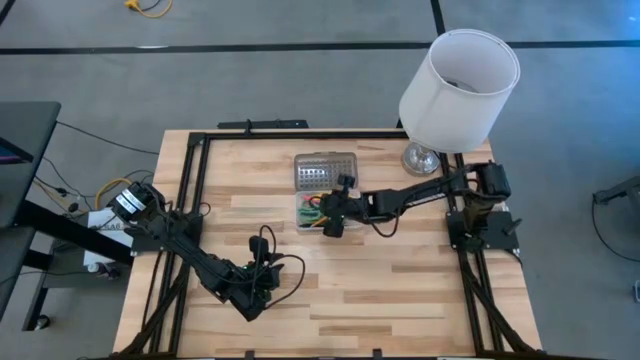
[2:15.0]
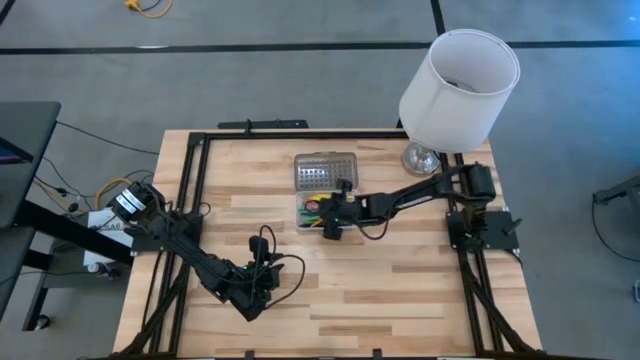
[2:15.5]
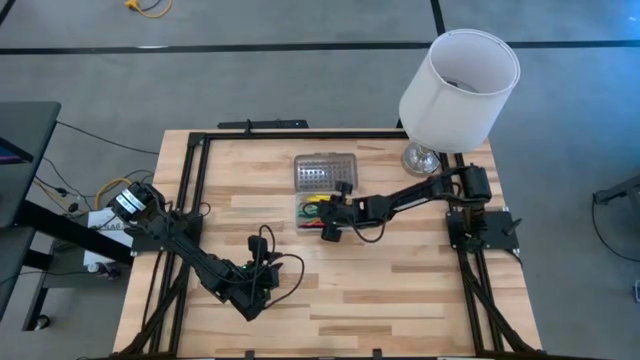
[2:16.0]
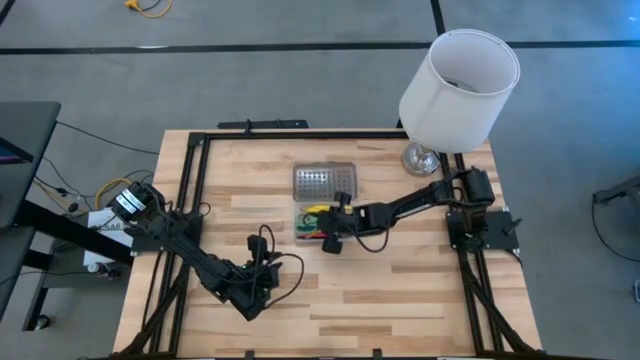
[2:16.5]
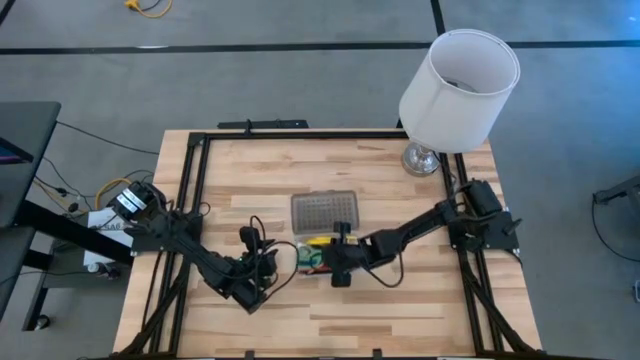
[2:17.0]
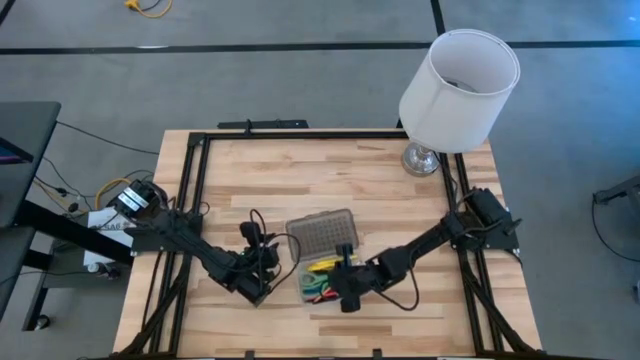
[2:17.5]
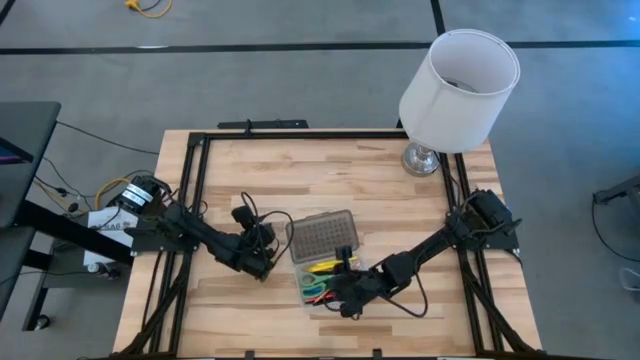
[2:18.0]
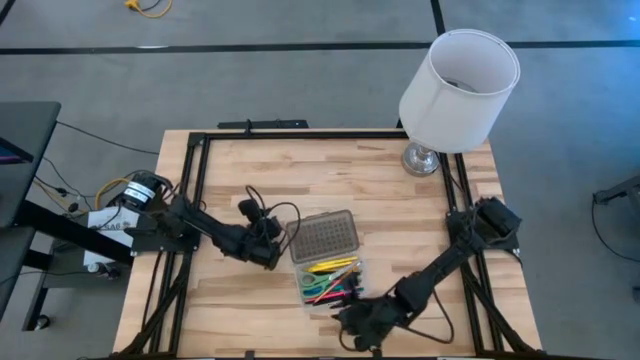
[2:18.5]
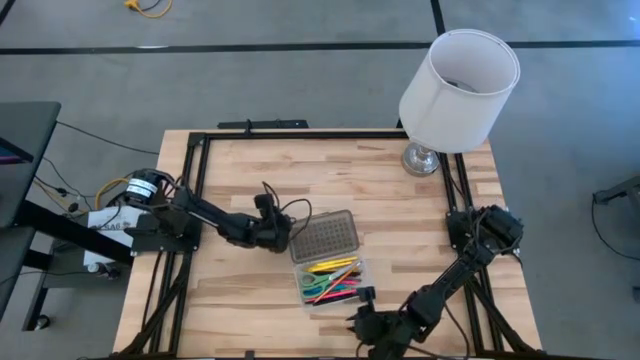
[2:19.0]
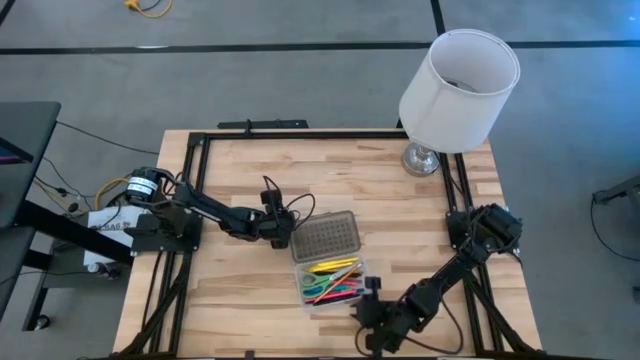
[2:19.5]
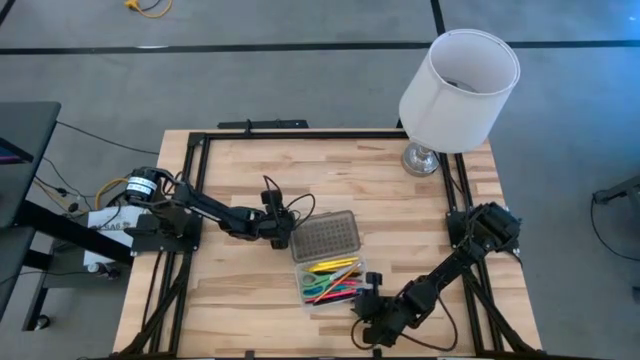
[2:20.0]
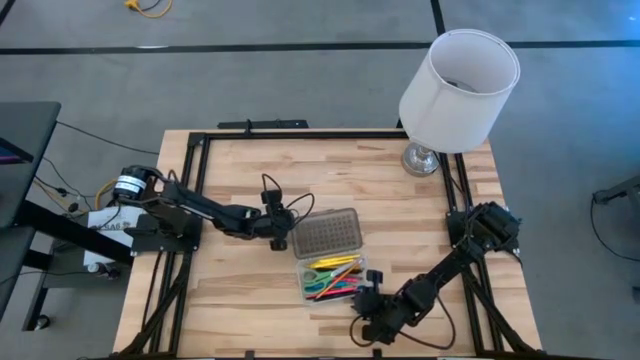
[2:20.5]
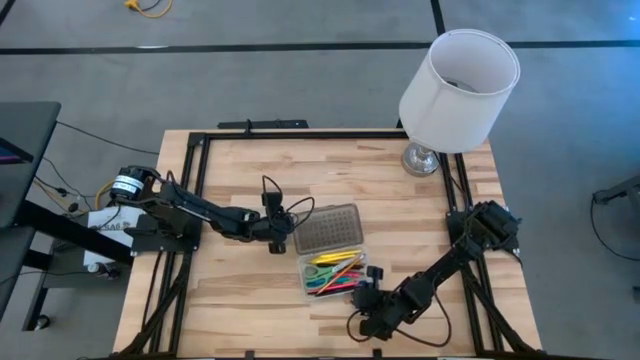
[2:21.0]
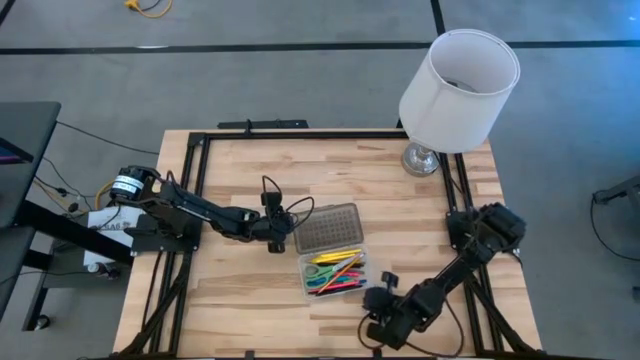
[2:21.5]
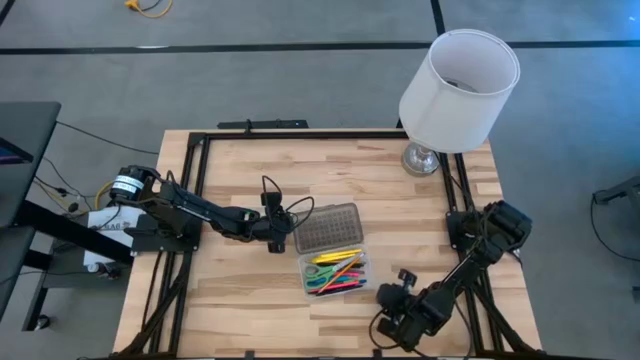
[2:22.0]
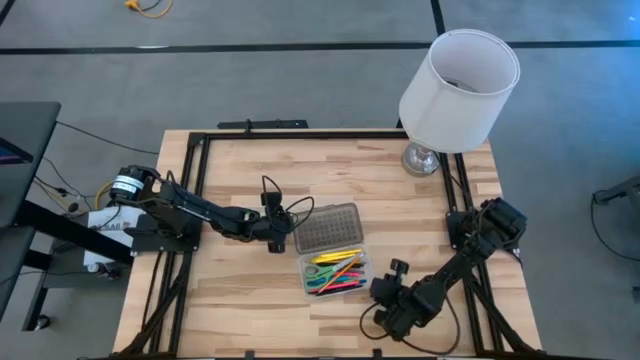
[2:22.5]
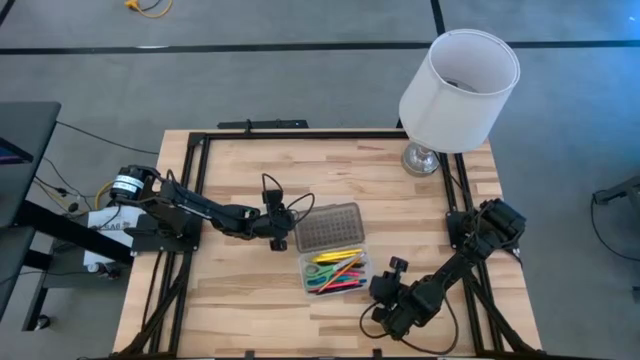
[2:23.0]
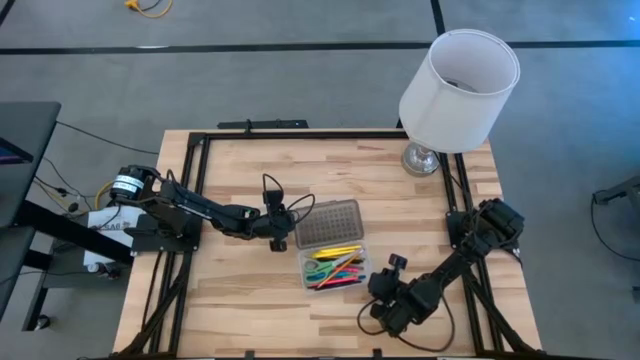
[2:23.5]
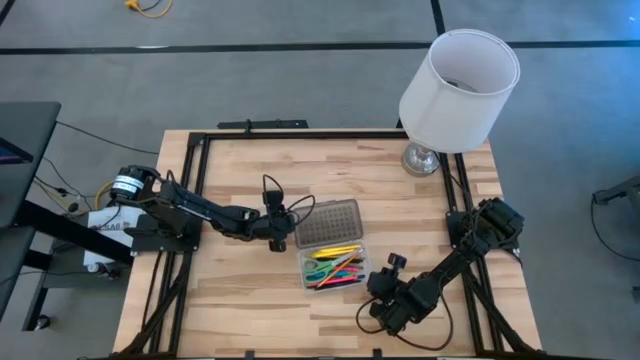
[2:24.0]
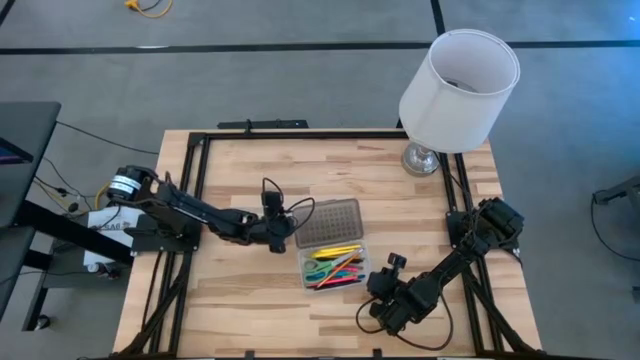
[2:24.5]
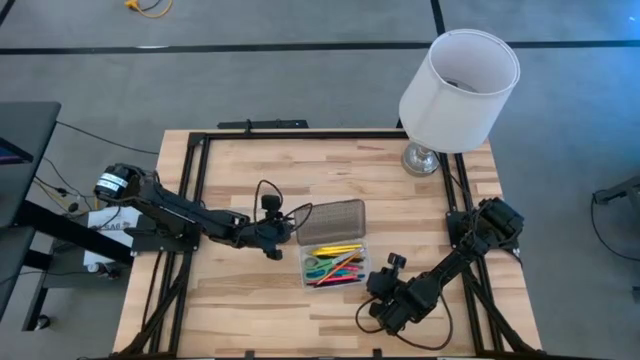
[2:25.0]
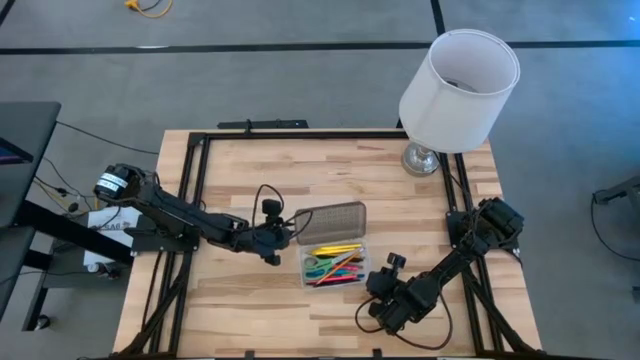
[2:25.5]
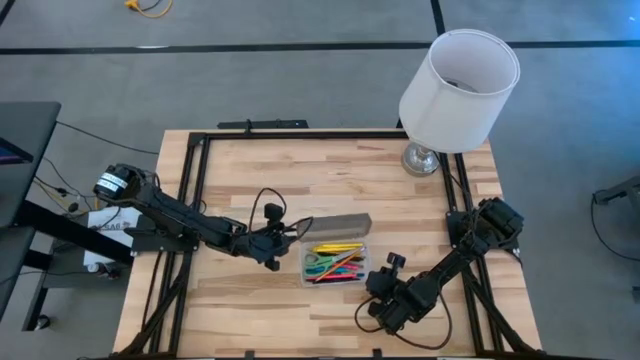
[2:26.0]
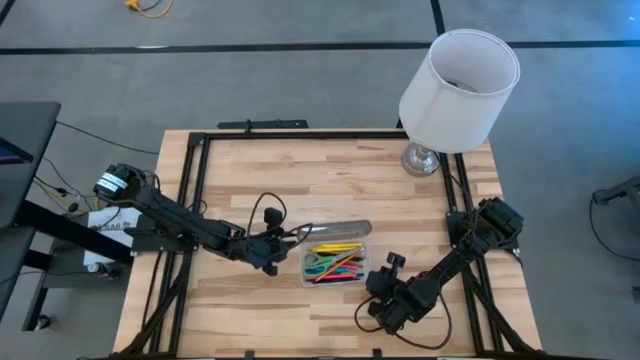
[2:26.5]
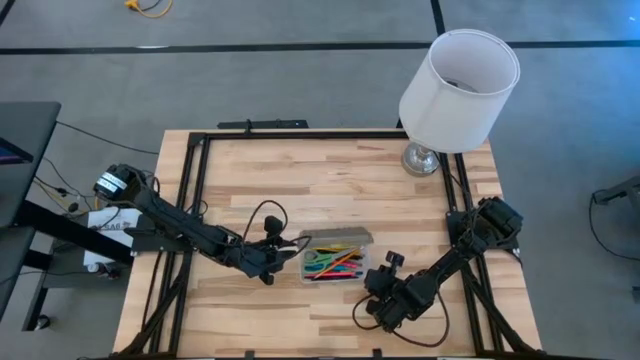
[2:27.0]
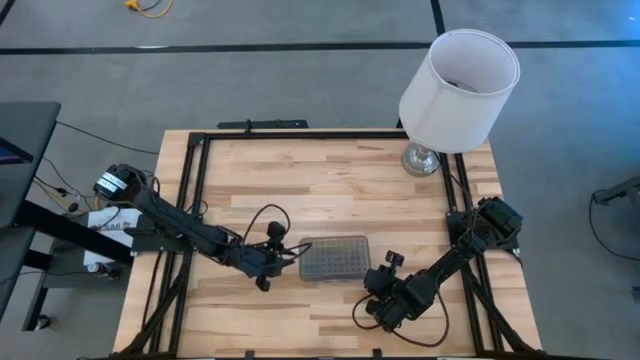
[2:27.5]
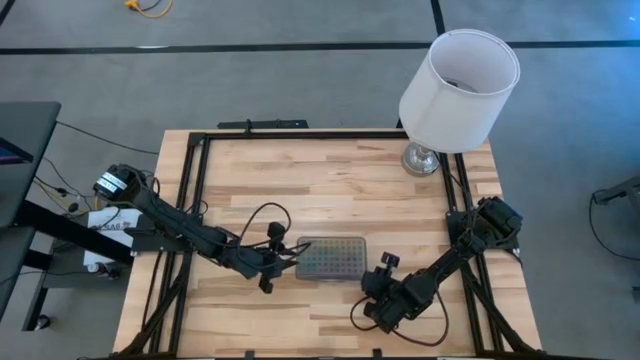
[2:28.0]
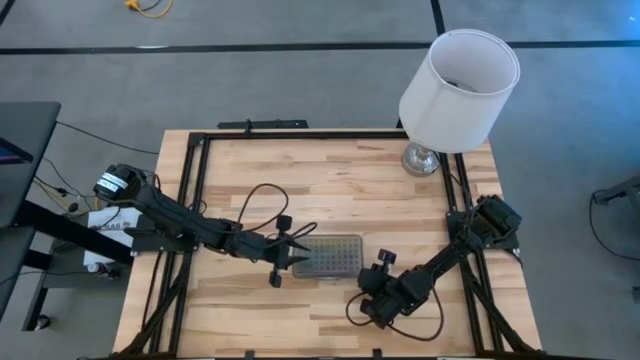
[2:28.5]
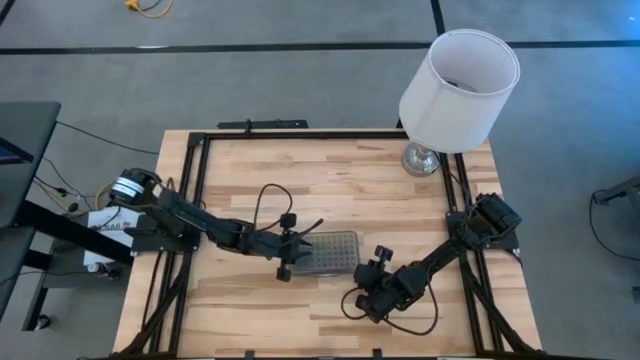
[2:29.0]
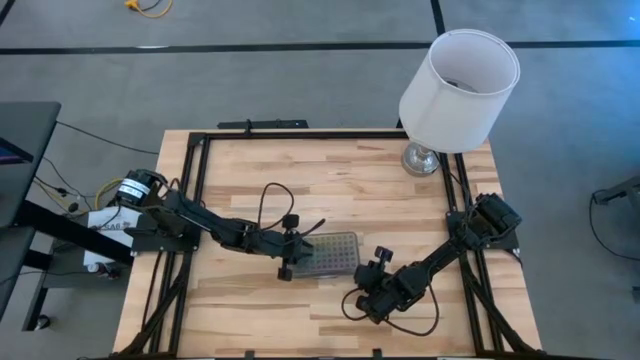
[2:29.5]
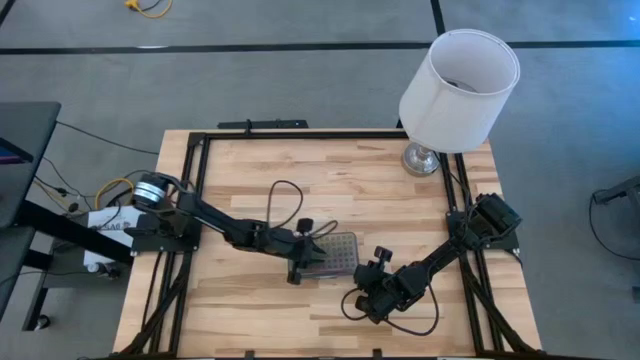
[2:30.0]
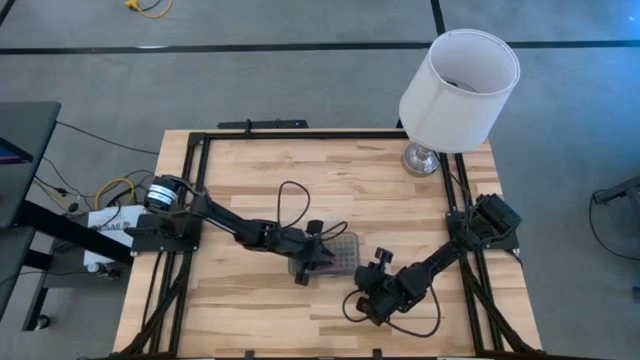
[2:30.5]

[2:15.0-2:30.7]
Task: Pick & place school supplies into a supply box
Close the gray supply box

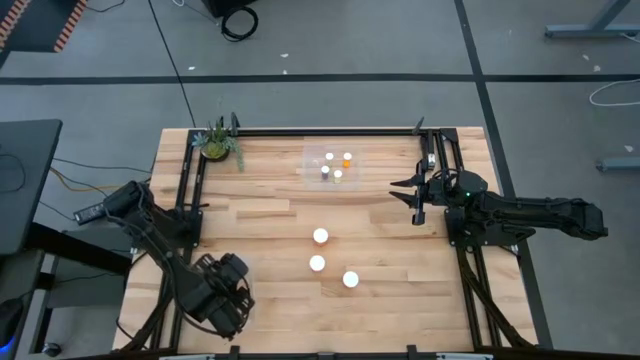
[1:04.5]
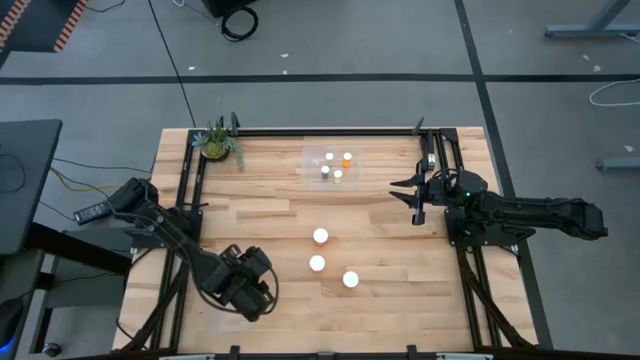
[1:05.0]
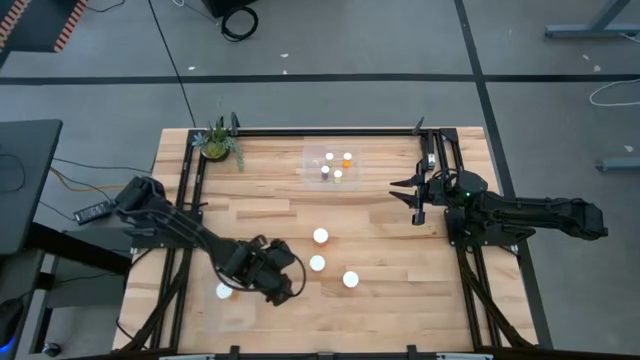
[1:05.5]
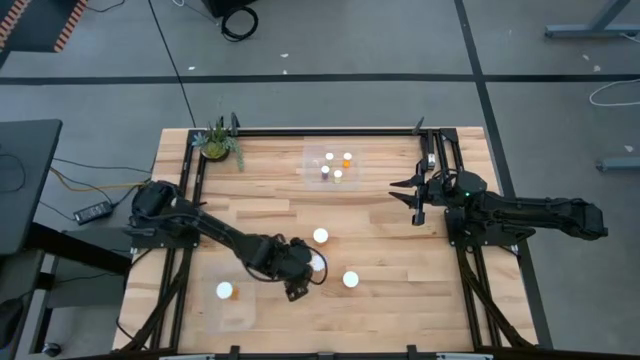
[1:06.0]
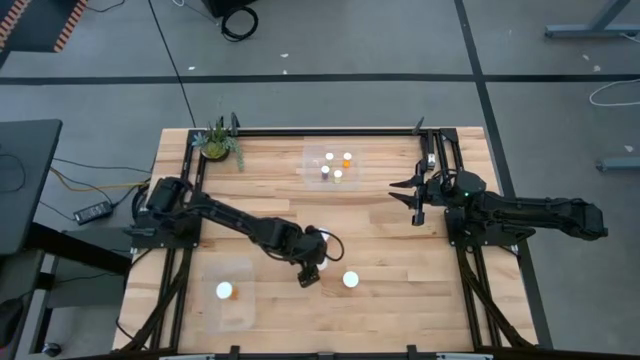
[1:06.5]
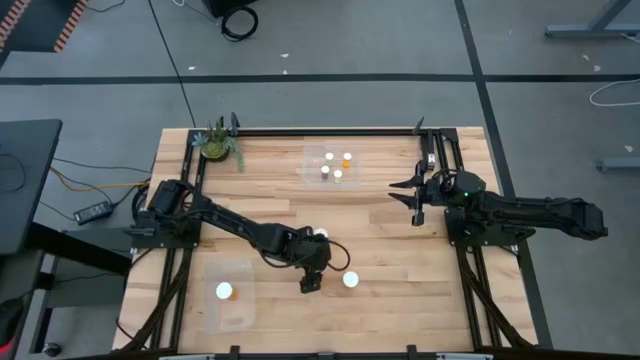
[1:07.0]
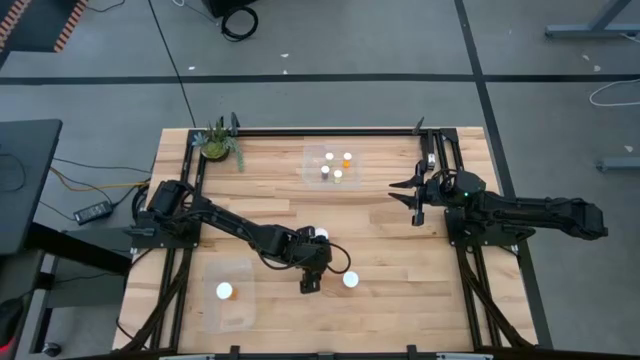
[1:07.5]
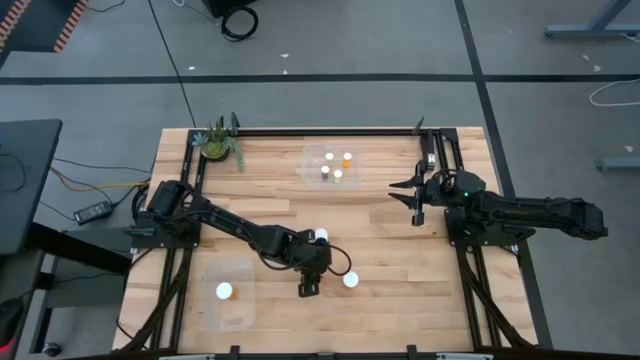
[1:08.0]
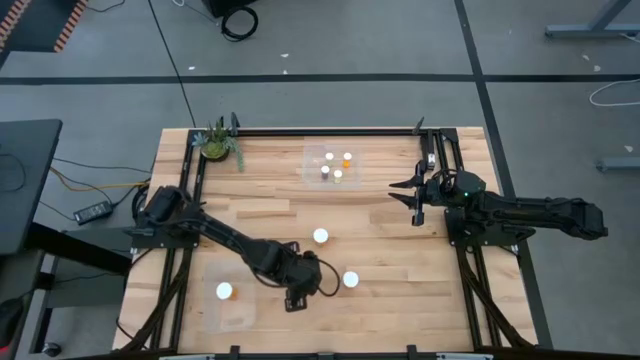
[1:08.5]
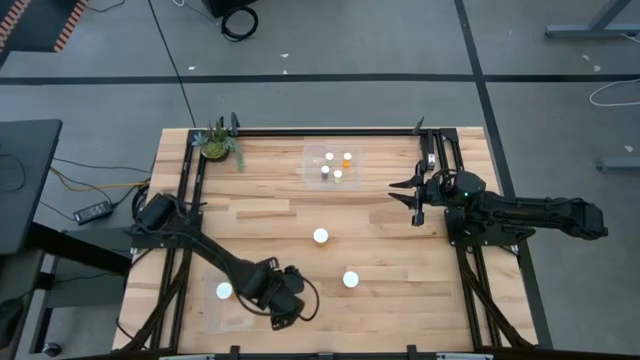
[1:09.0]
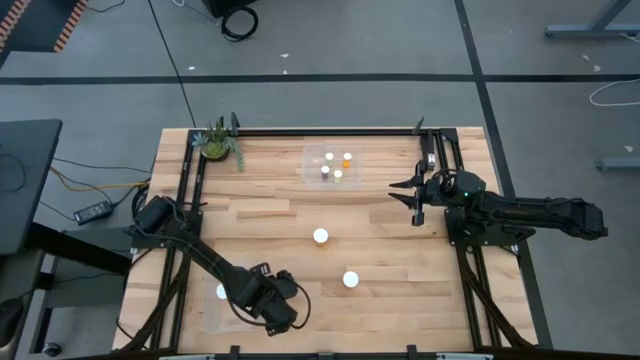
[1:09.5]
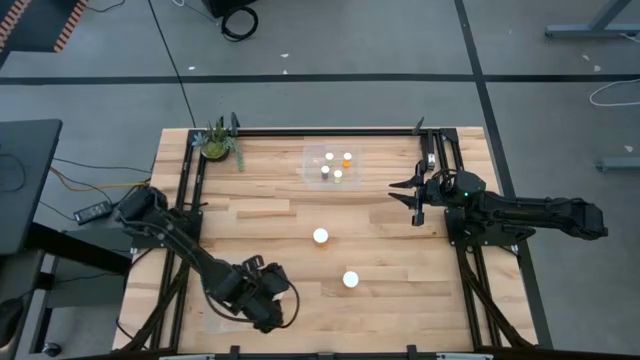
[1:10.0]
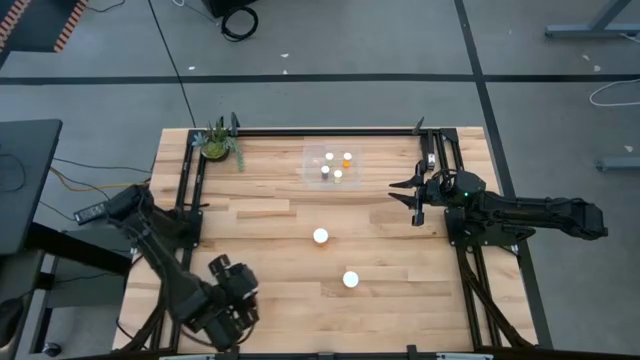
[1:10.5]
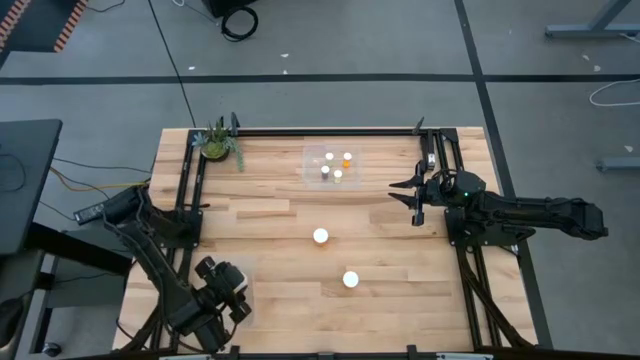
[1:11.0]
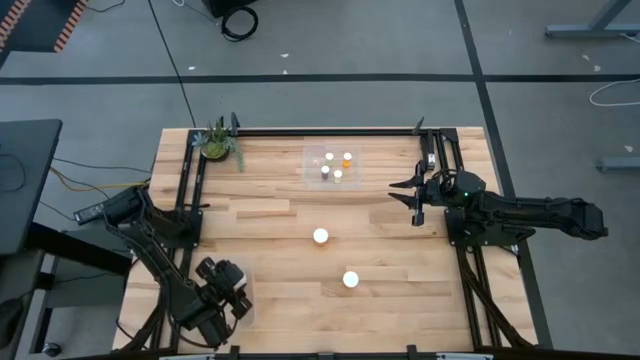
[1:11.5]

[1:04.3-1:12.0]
Task: Pick and place medicine bottles into bin by pill shape (circle, oval)
Put the orange capsule bottle into the bottom transparent bin
